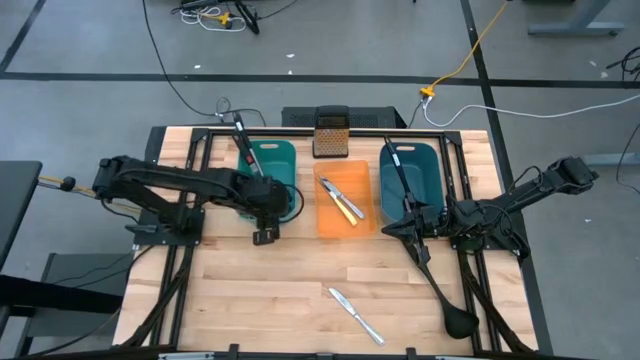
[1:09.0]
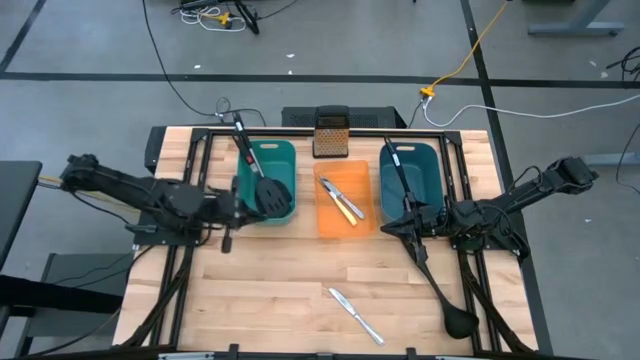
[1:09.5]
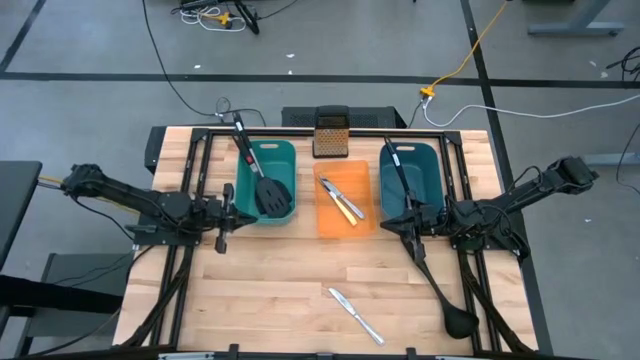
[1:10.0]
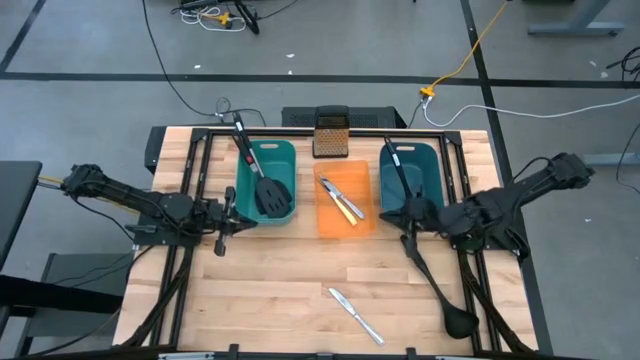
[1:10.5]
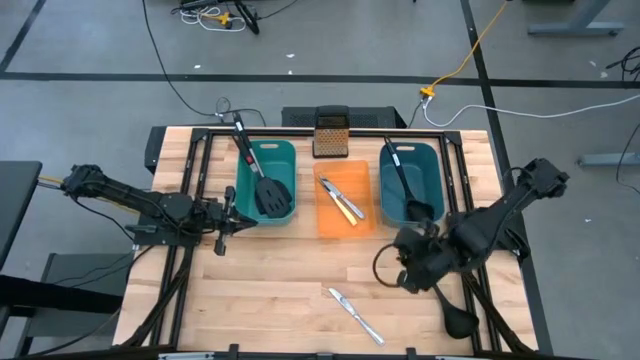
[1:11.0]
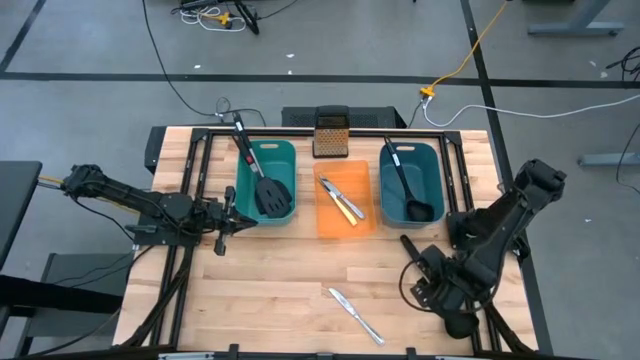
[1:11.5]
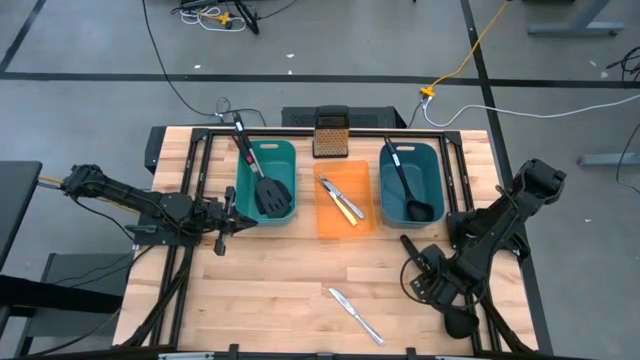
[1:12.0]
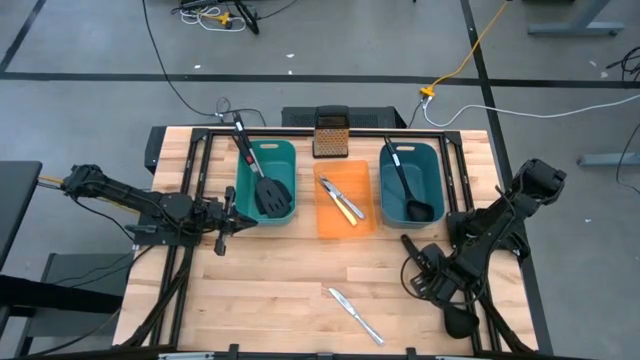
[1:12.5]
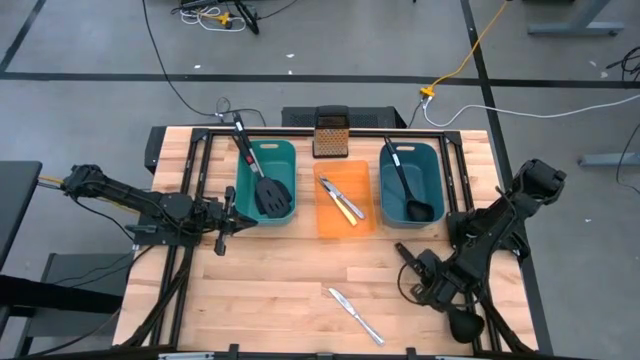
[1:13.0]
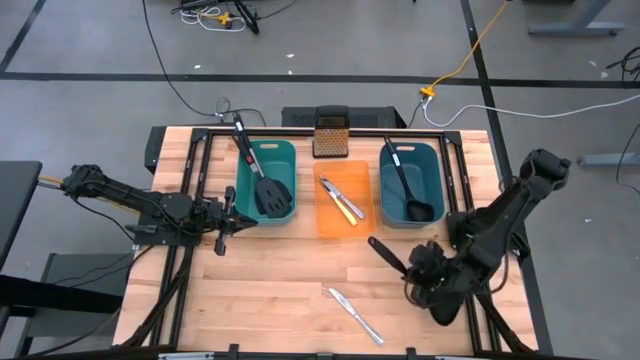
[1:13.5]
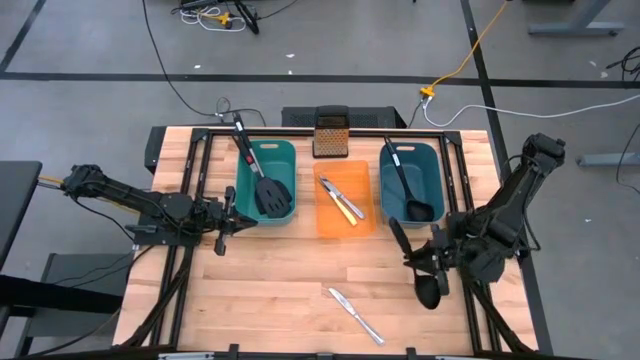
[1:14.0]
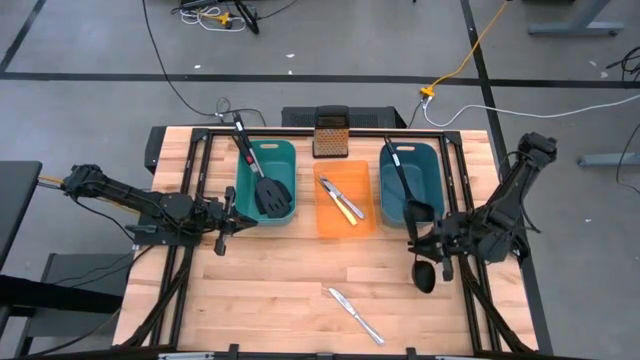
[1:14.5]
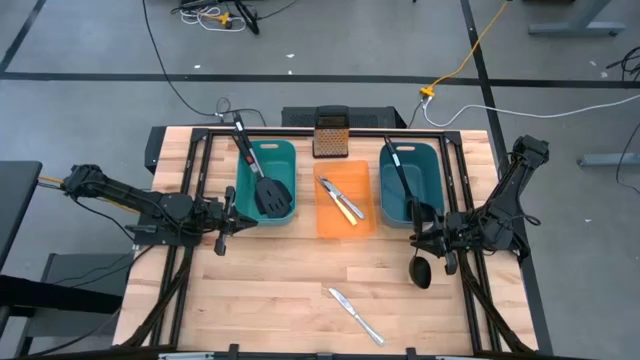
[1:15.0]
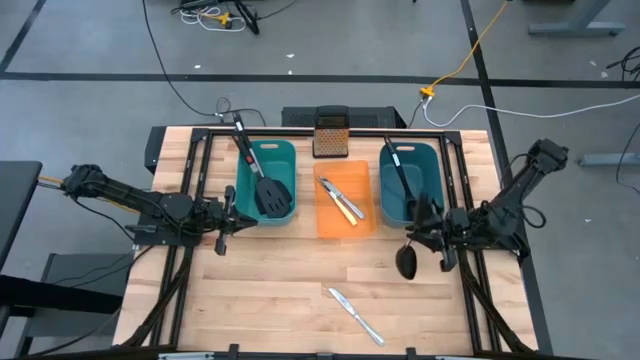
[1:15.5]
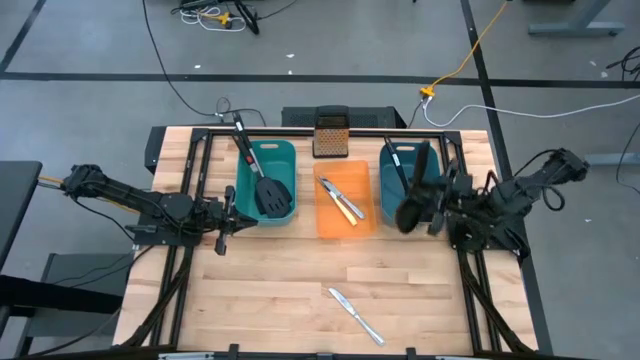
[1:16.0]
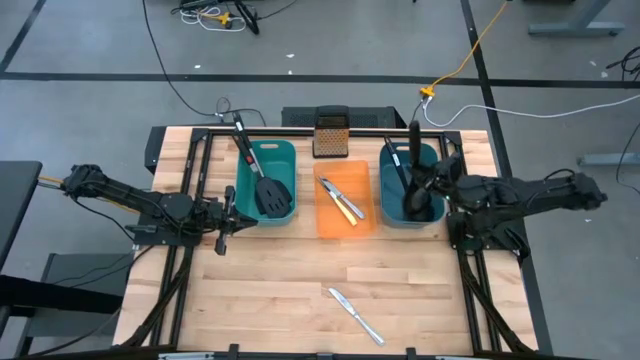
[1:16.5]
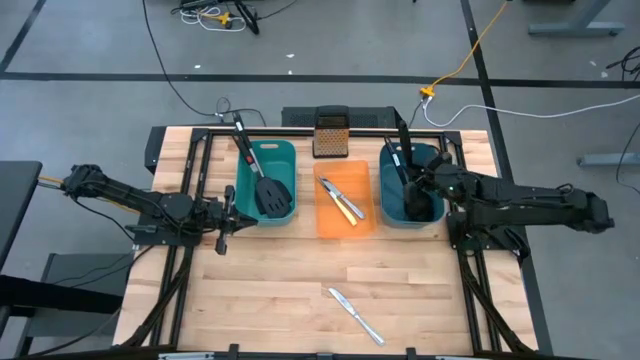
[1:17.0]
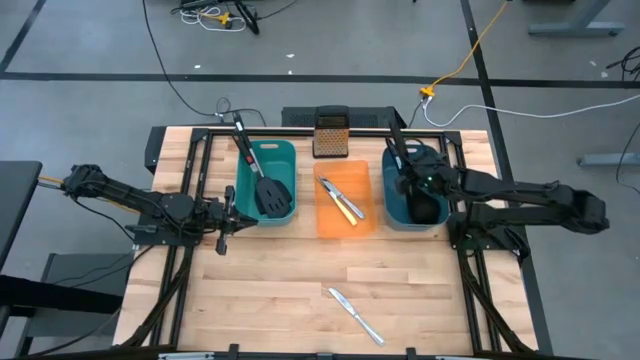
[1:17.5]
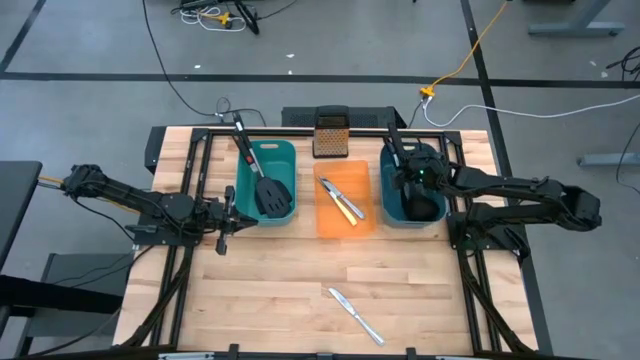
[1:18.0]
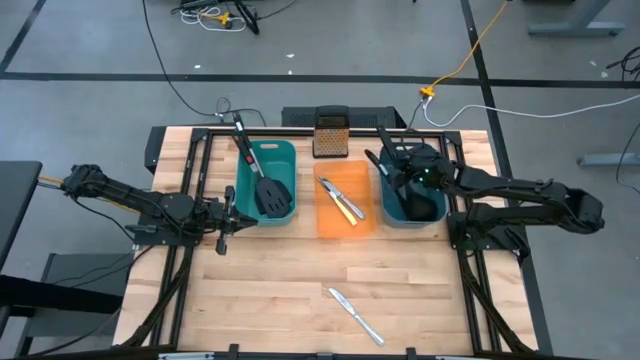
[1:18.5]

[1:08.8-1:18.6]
Task: Pick & Place Kitchen Items
Put the black serving spoon into the blue bin

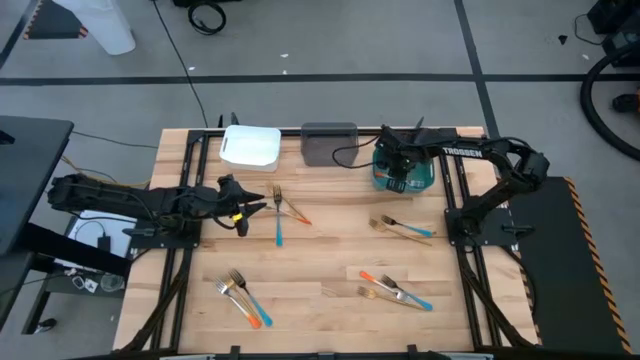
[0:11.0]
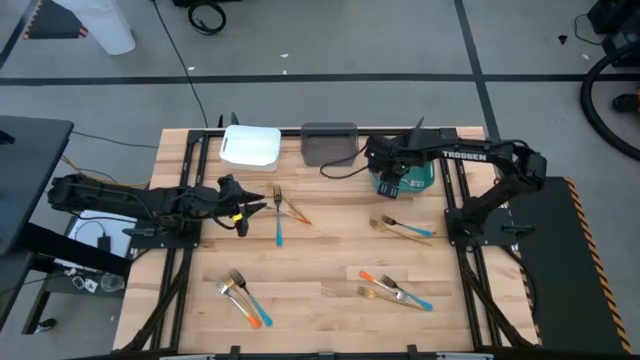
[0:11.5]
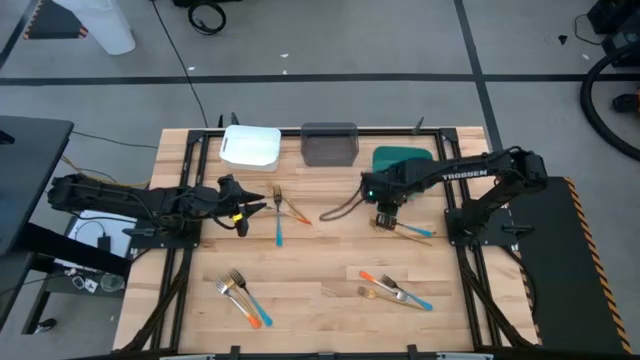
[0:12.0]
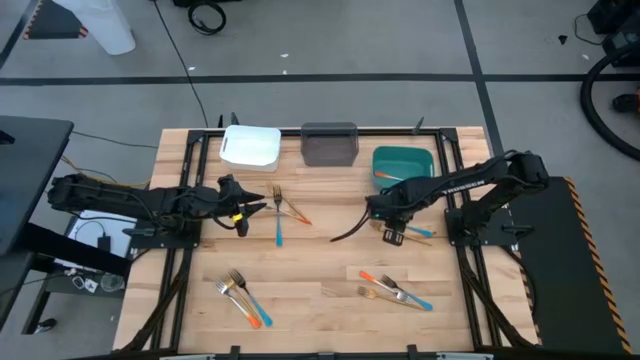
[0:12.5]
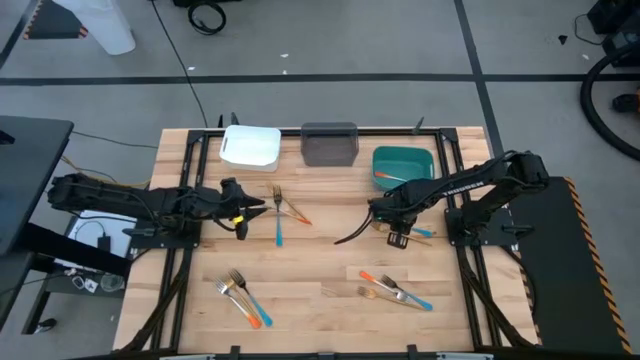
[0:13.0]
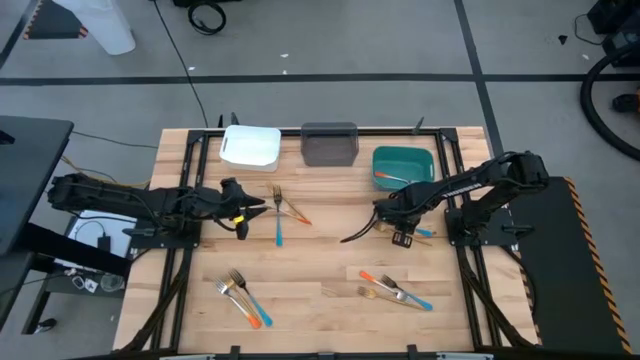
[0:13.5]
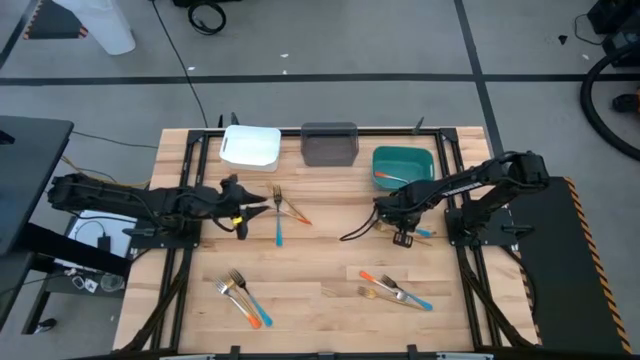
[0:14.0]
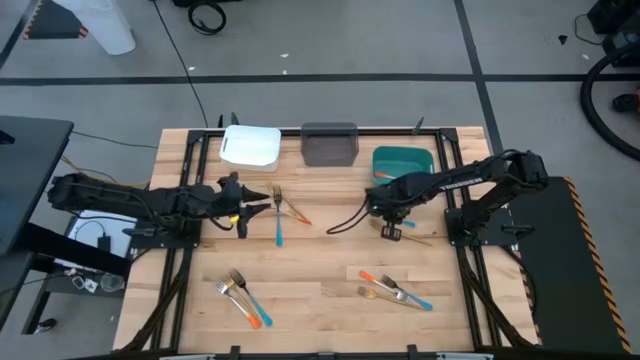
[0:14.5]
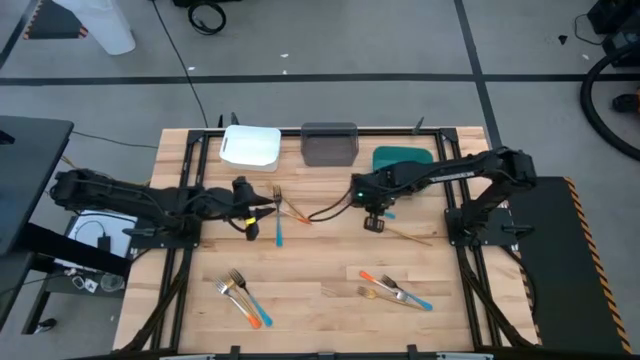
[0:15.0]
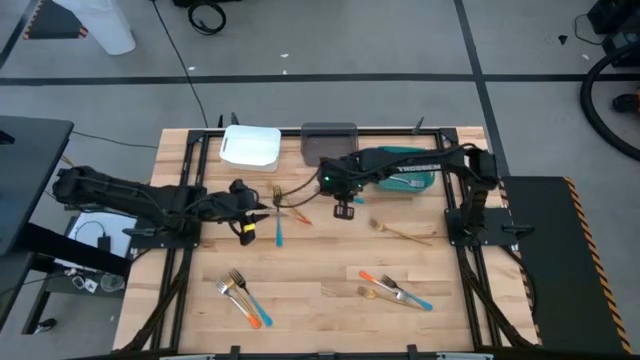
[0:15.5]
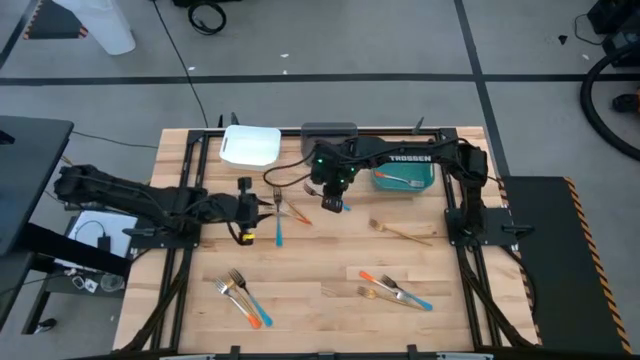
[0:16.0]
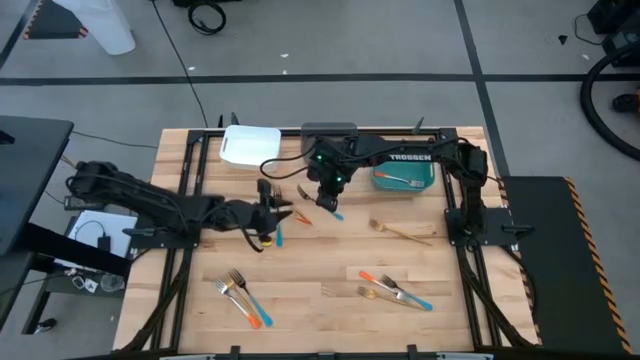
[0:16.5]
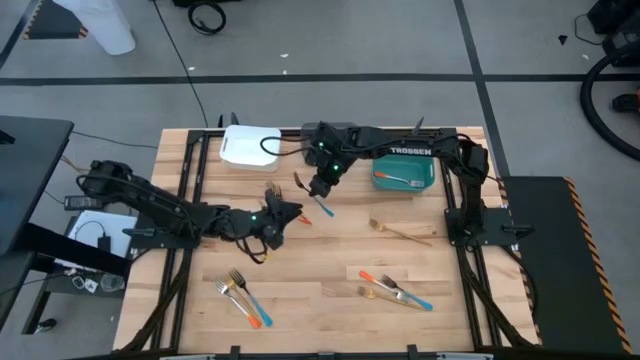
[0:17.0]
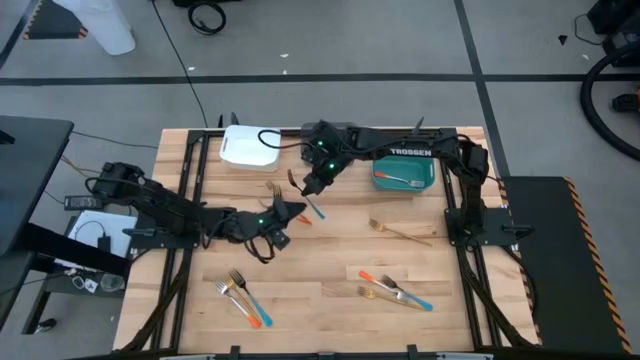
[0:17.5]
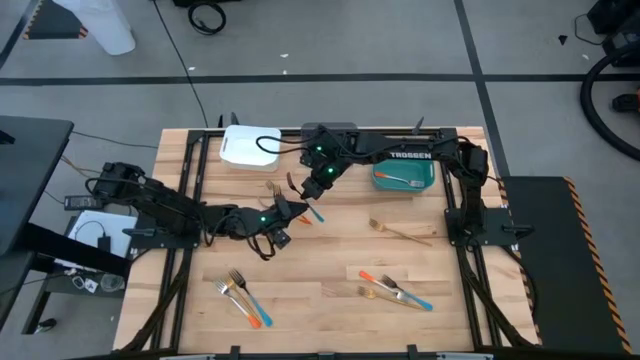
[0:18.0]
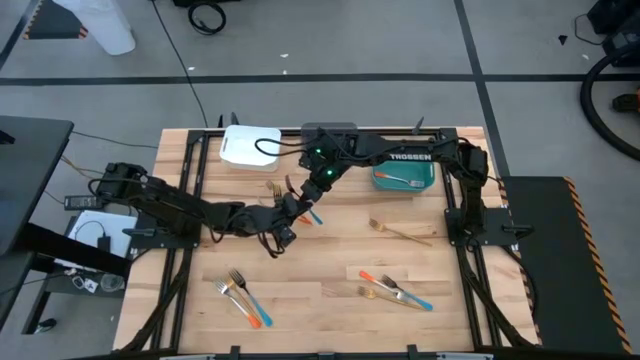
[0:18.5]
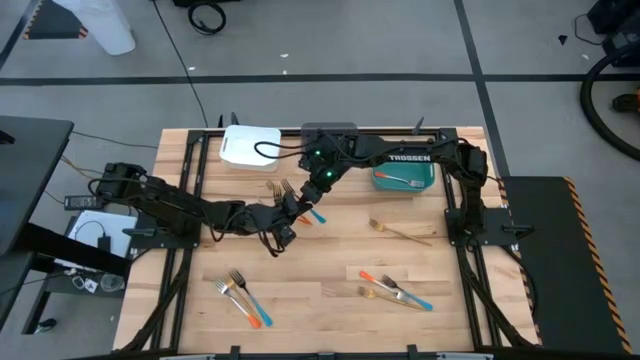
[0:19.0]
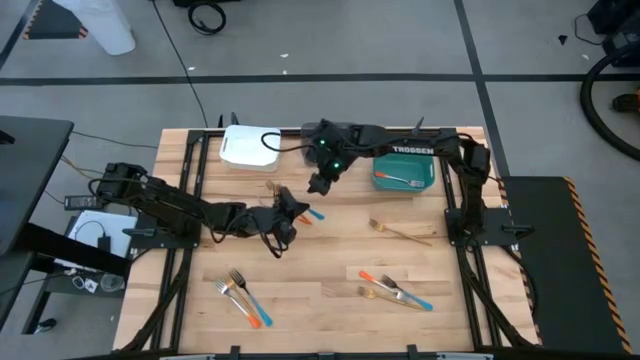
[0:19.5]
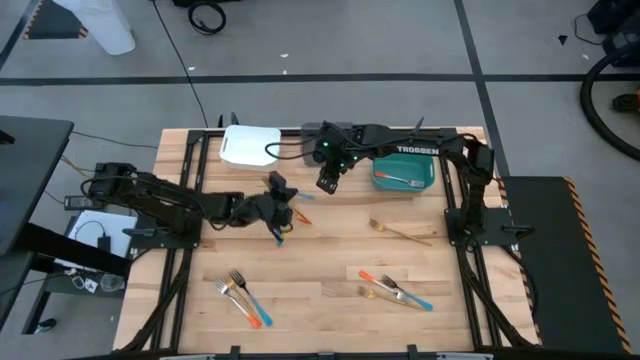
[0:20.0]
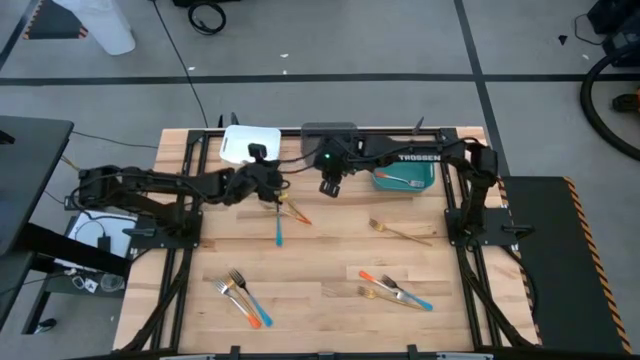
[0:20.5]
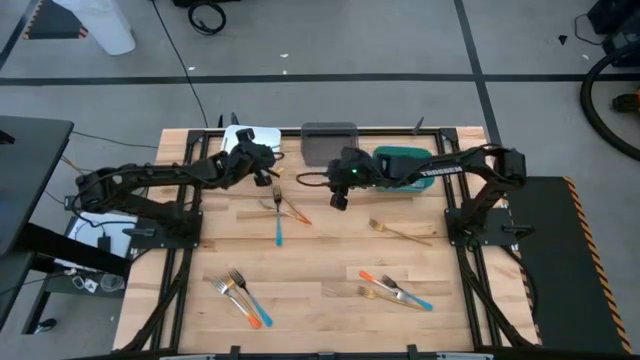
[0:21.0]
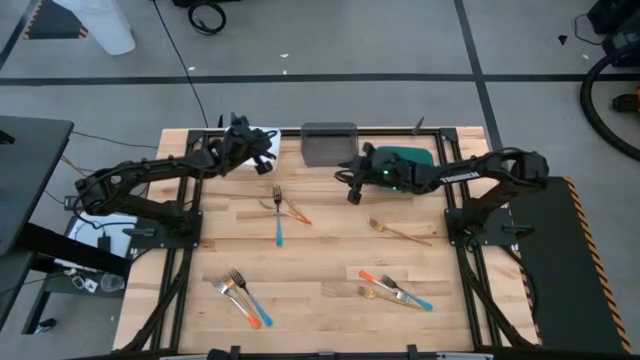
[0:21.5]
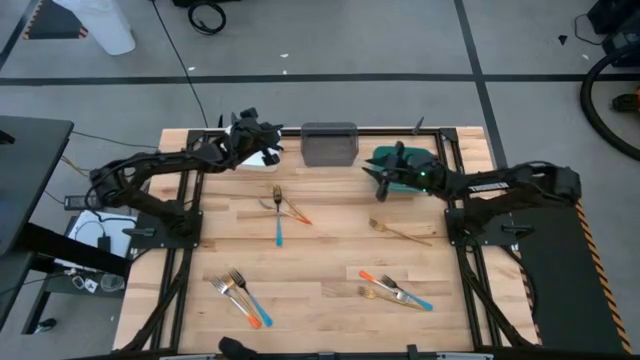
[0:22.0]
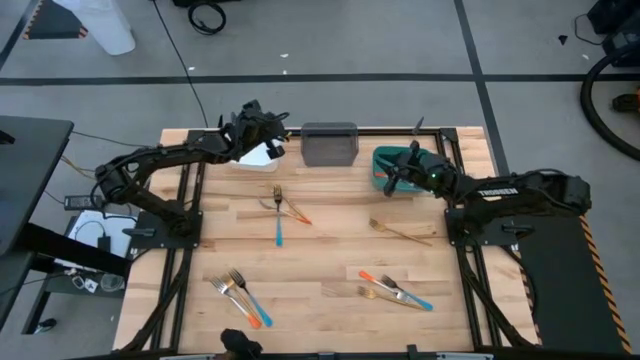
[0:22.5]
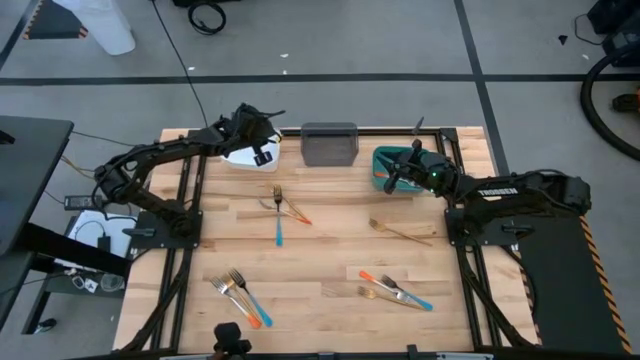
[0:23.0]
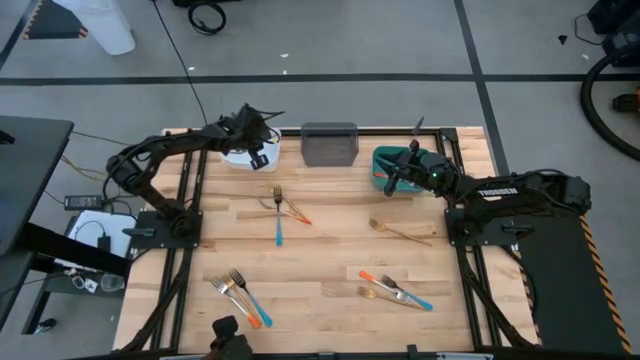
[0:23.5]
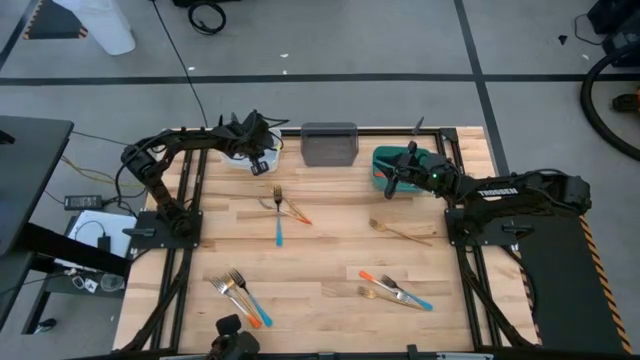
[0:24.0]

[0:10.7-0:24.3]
Task: Sort silverware by color (type)
Put the blue fork into the white bin
